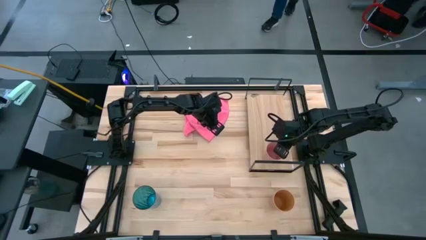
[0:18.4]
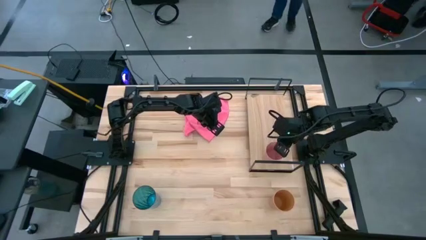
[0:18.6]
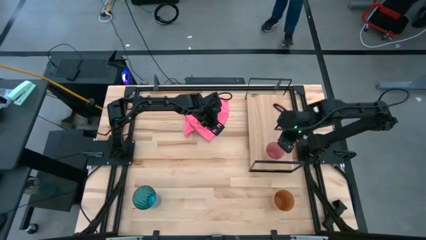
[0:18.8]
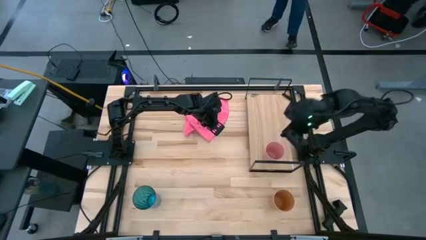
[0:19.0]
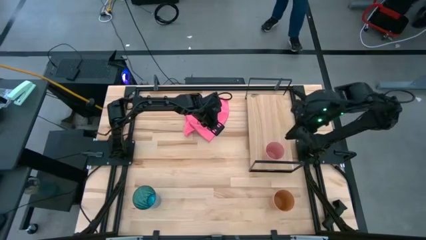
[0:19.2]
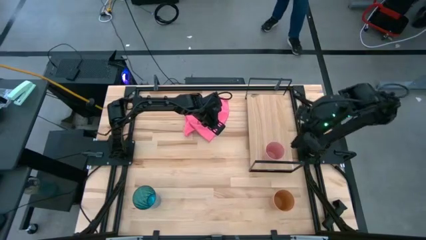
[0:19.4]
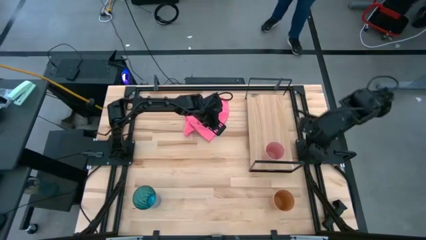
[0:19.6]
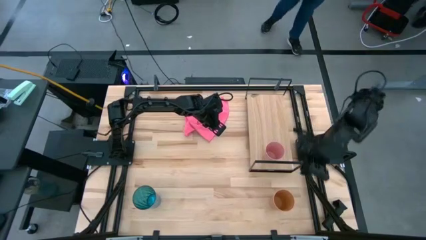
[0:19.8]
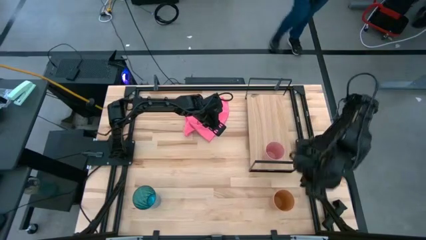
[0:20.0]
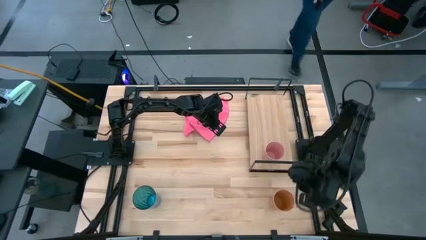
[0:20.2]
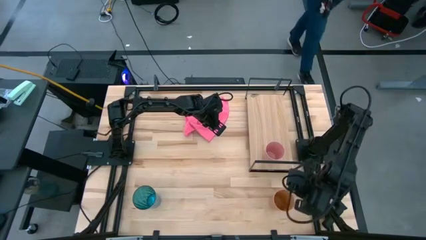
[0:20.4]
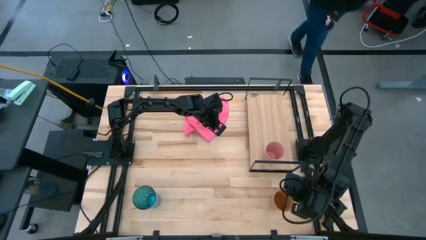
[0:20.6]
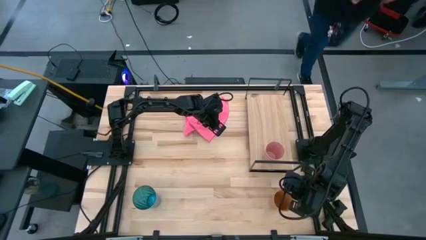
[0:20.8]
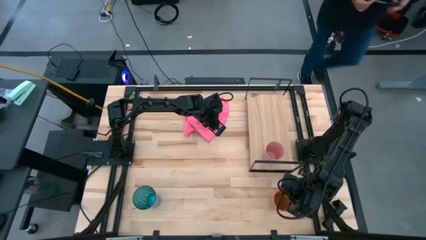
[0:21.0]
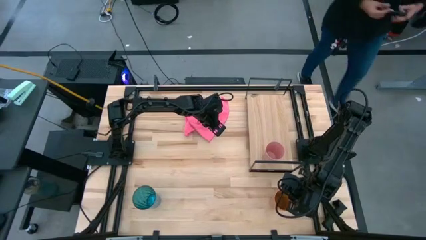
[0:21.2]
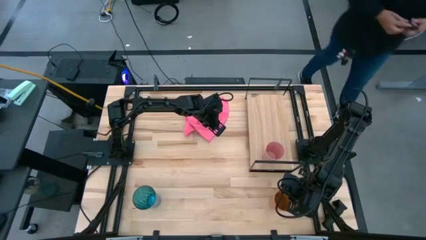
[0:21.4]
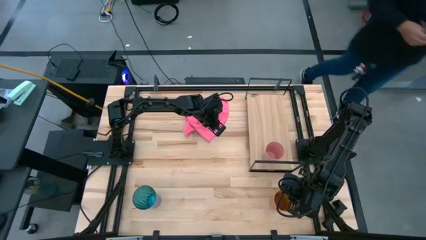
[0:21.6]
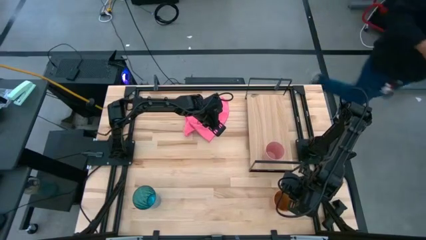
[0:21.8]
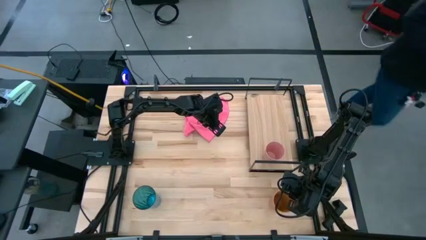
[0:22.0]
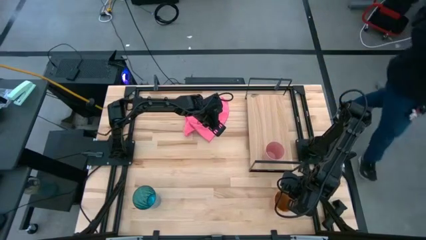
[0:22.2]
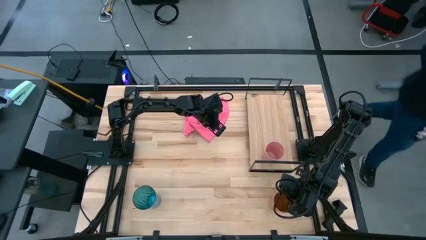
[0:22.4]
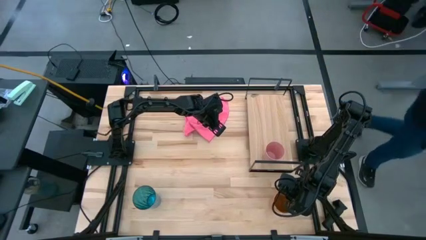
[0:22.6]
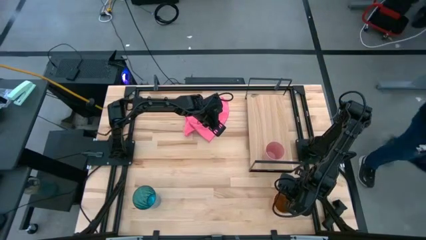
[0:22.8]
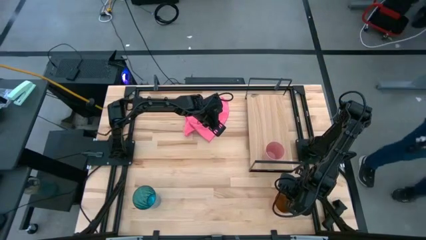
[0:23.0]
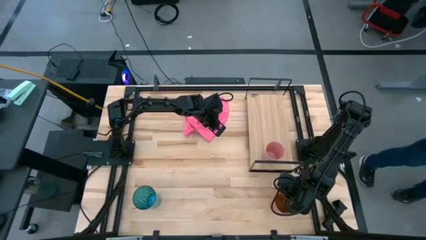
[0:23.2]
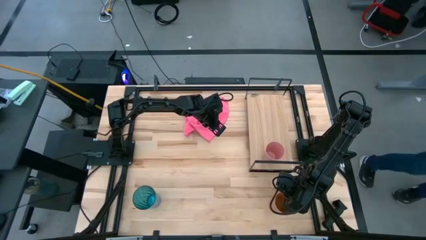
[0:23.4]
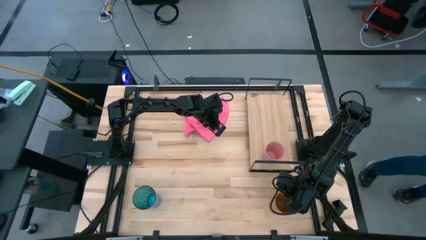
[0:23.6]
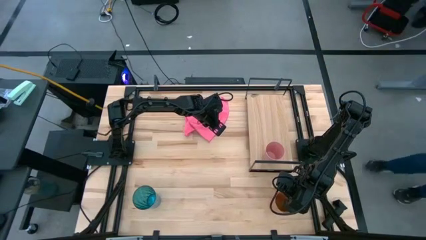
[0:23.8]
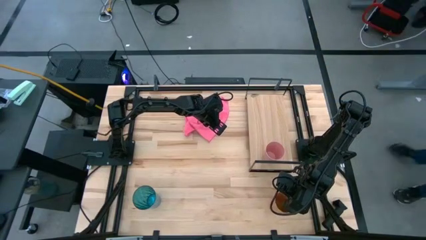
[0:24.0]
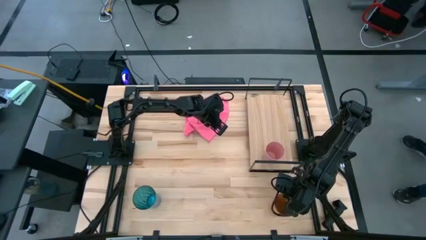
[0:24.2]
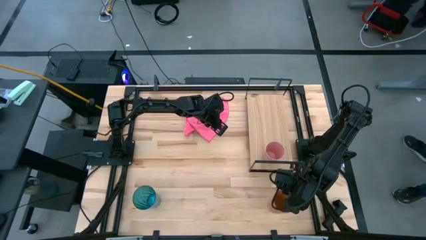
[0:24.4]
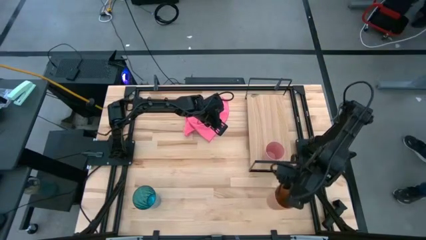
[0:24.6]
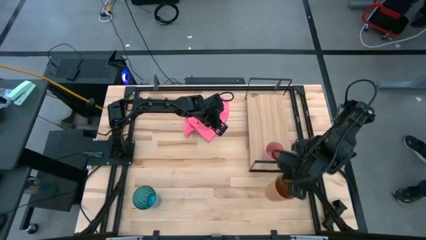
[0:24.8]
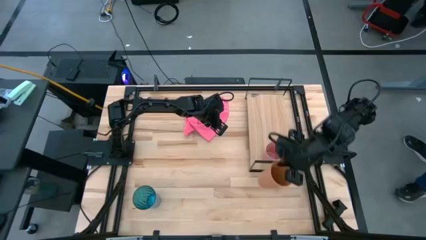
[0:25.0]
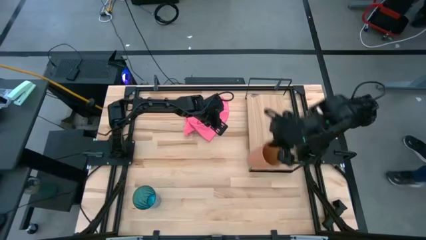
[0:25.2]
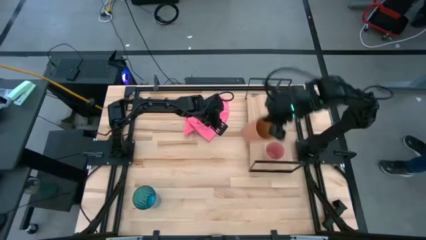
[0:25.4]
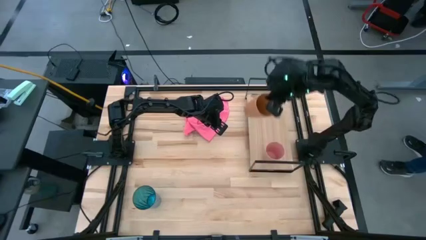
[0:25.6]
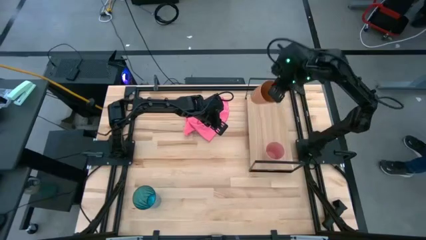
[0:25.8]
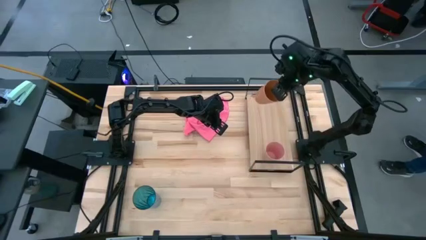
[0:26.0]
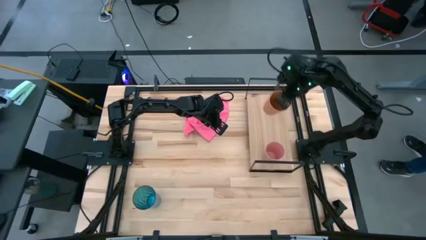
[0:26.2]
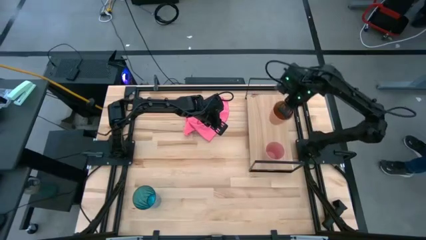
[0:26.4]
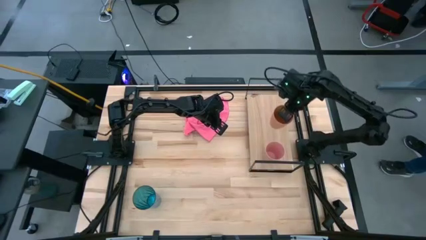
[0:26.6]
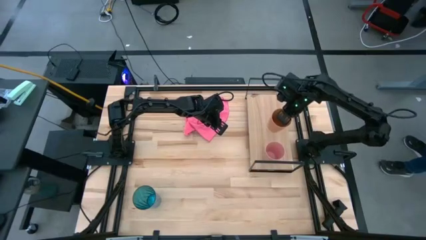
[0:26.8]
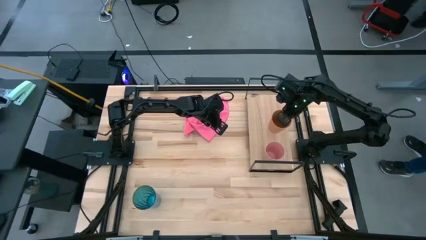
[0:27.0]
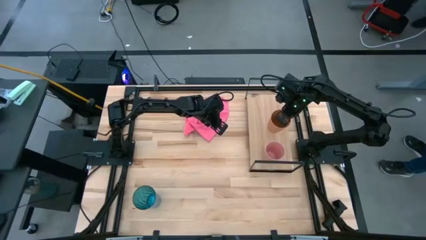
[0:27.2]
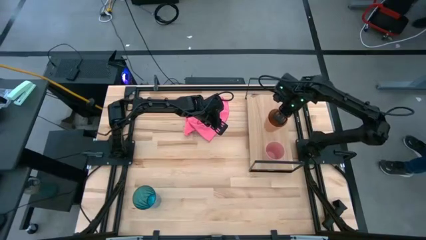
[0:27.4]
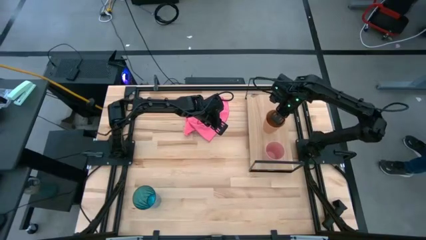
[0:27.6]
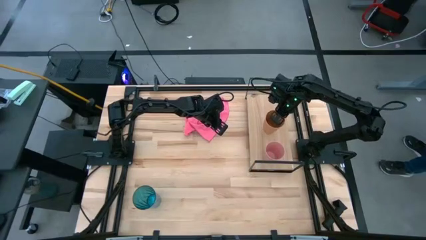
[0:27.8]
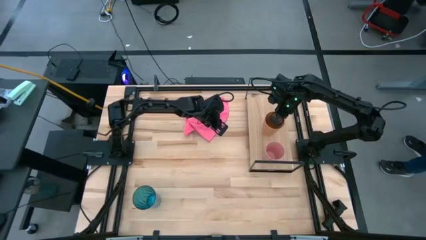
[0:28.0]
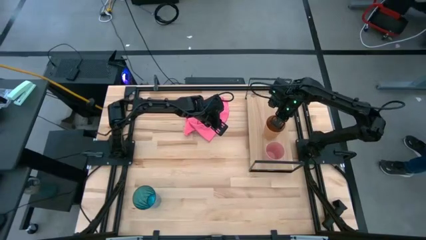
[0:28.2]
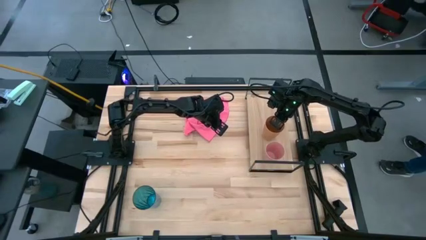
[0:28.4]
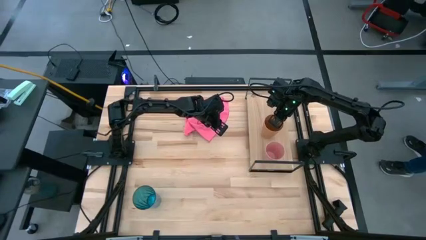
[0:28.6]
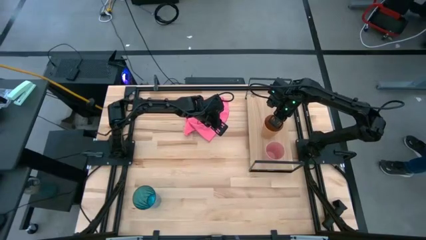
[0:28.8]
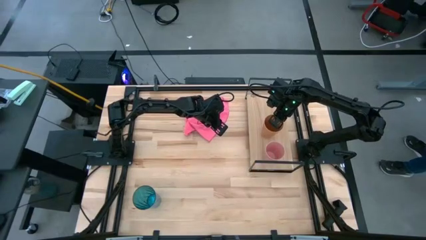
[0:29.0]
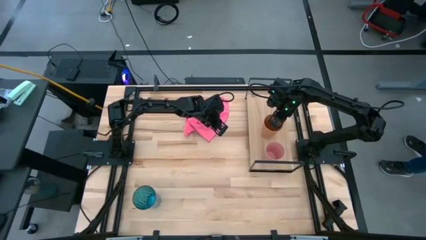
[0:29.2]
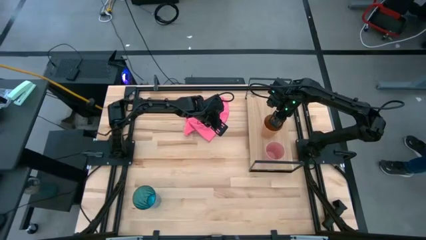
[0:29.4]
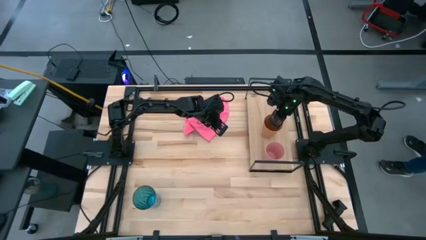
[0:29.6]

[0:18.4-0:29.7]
Task: Stack small to large cups/mugs on shelf
Put the orange cup on the shelf

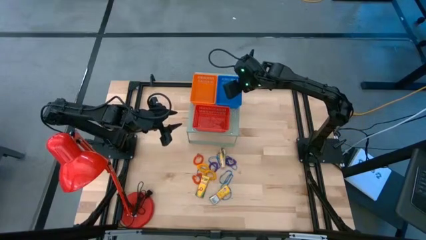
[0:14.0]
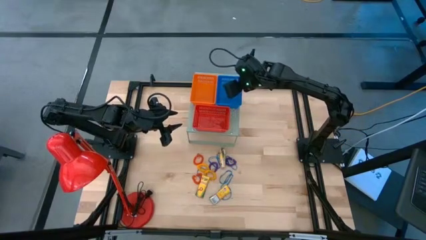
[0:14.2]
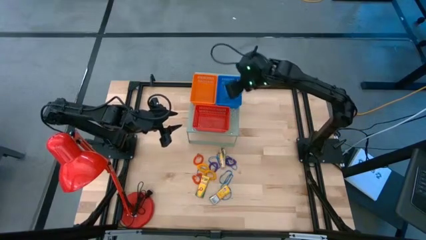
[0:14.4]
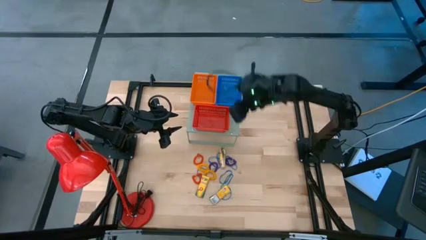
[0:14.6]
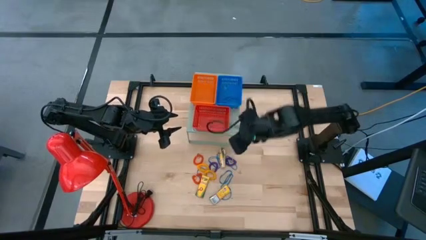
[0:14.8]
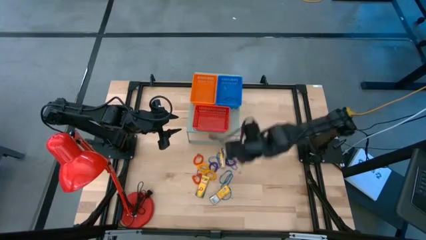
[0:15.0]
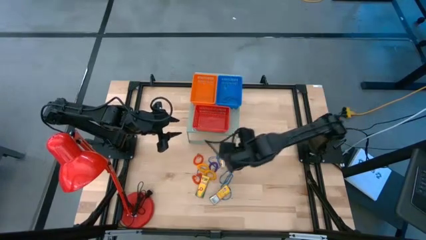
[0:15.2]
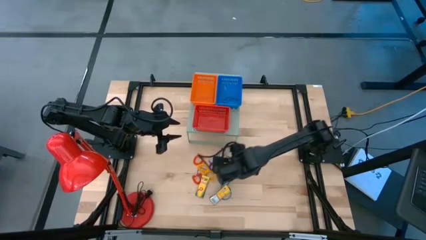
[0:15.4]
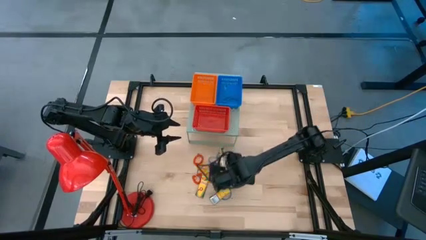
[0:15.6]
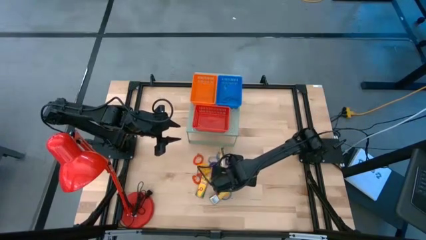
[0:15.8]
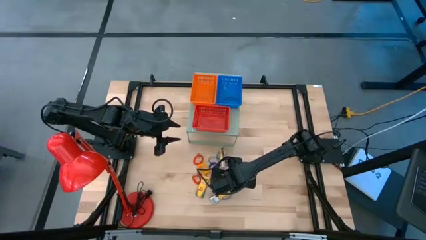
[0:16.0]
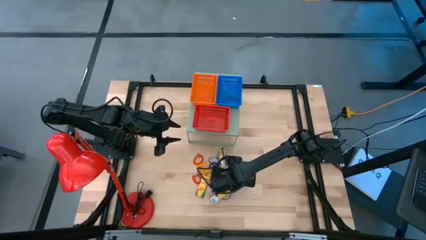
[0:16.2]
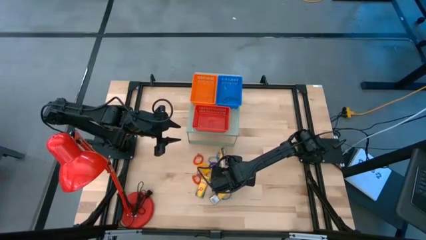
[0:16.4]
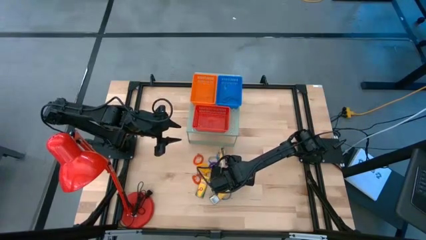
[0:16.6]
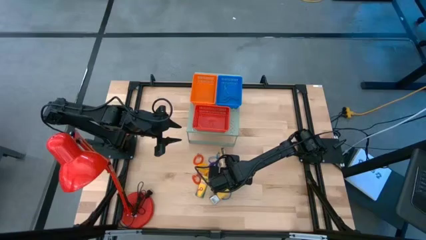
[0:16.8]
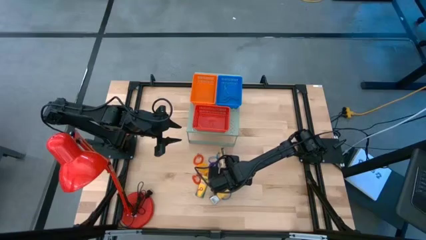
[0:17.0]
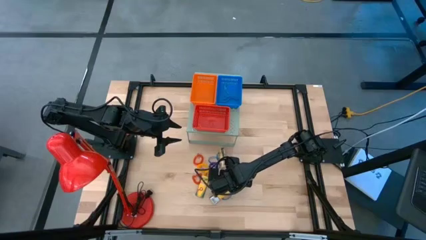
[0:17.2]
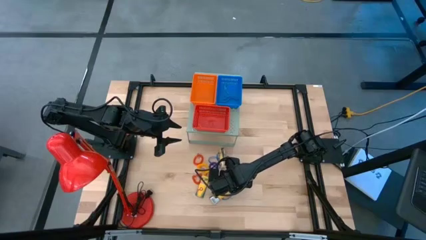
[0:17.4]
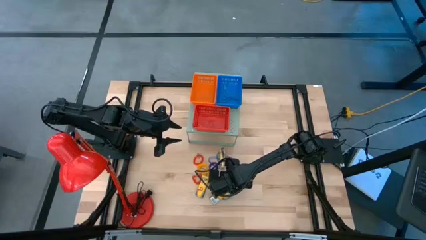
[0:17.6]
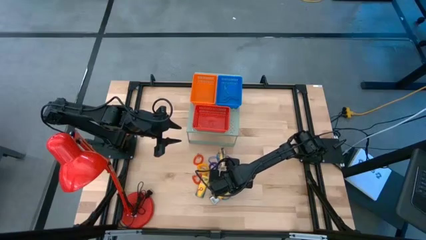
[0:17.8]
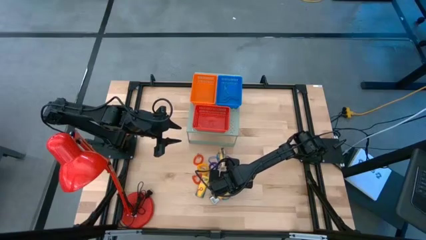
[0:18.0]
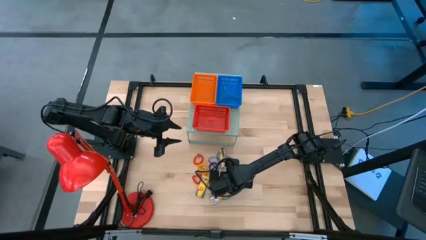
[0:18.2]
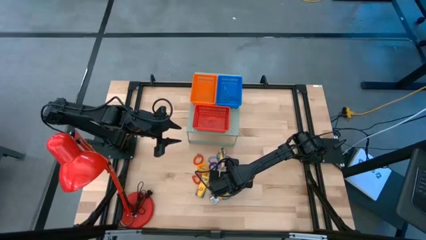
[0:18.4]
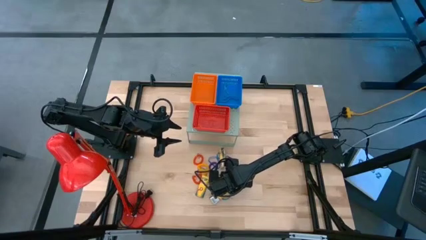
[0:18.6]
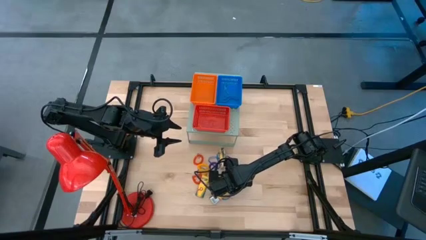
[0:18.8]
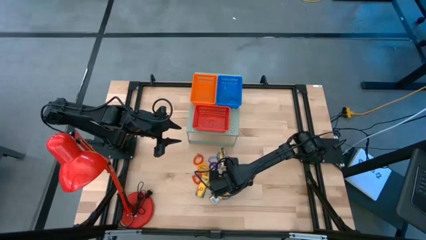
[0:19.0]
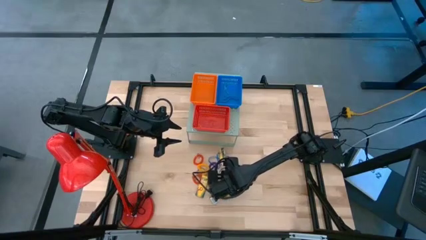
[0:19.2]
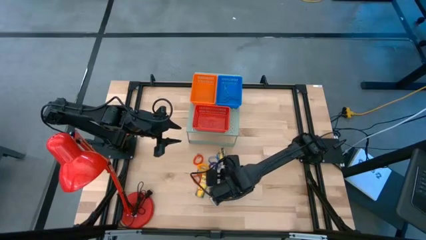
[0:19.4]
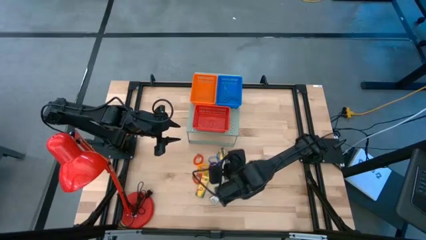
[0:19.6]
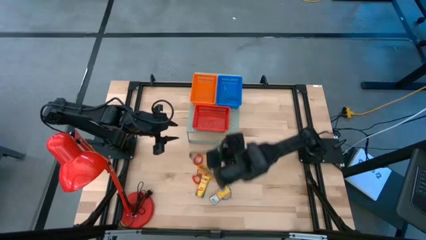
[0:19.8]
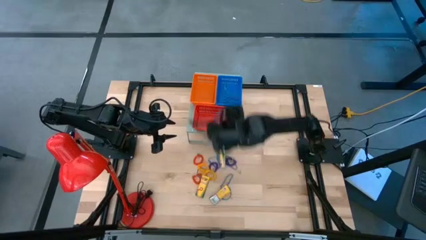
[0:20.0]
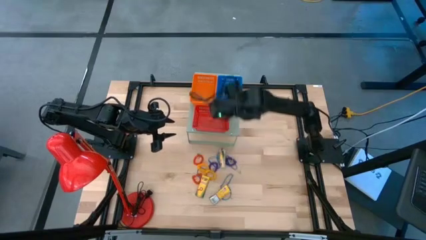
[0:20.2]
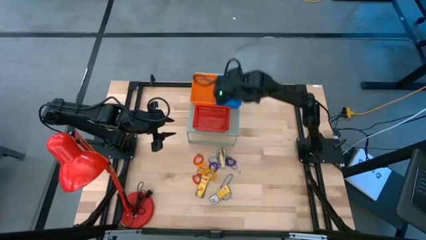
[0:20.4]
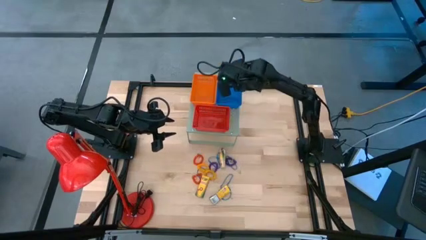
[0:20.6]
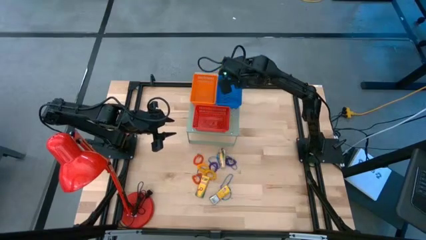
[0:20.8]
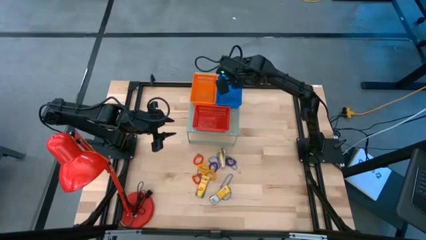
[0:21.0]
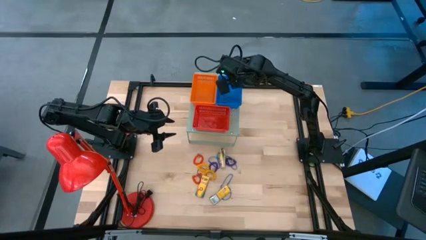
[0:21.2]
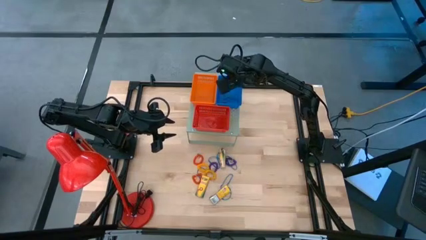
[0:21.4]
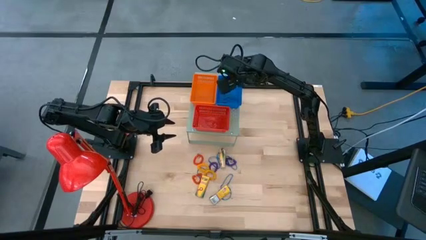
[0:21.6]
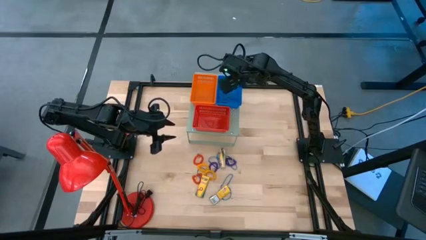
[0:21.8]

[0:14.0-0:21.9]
Task: Pick & Place Office Desk Supplies
Put the blue rubber band into the blue bin
